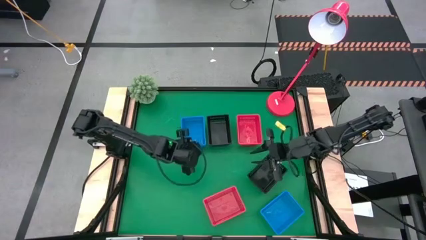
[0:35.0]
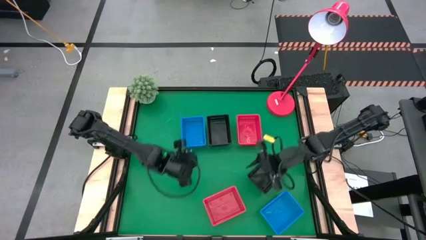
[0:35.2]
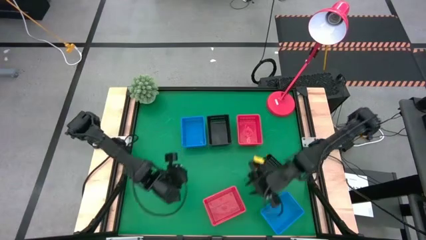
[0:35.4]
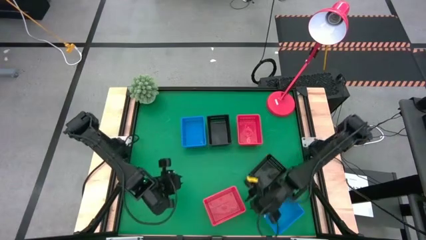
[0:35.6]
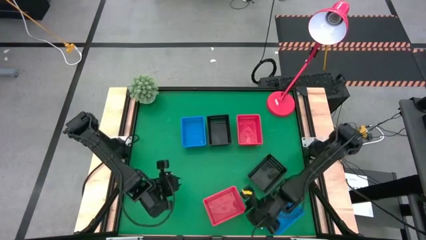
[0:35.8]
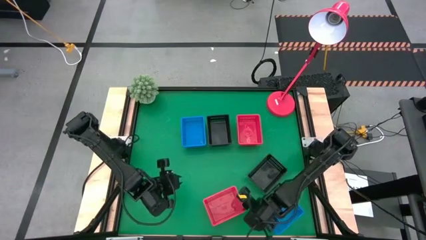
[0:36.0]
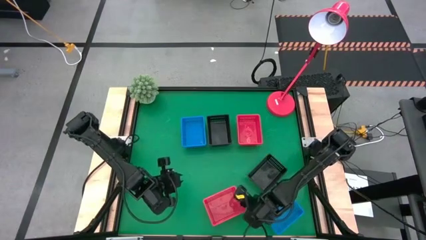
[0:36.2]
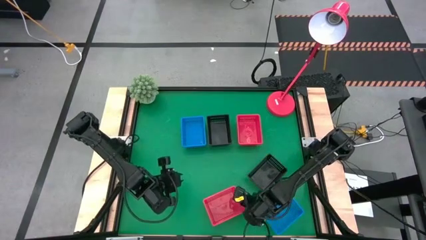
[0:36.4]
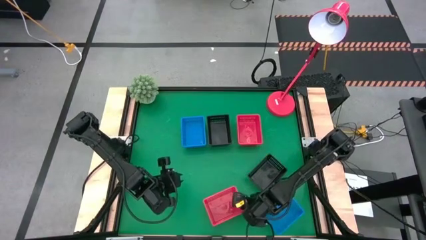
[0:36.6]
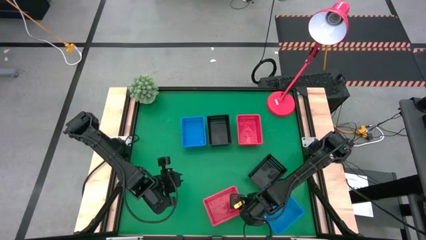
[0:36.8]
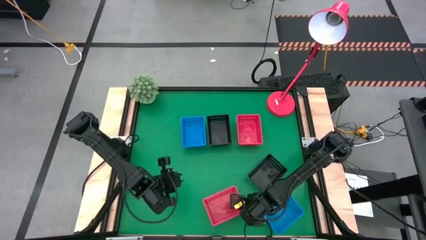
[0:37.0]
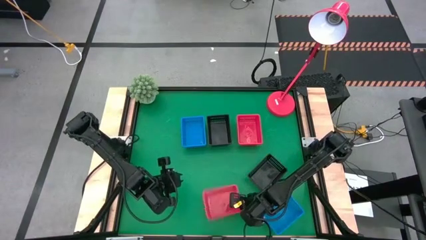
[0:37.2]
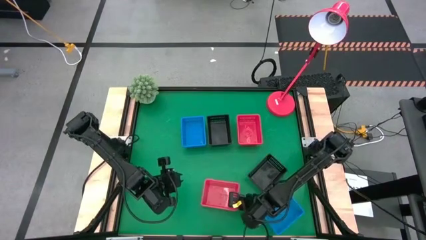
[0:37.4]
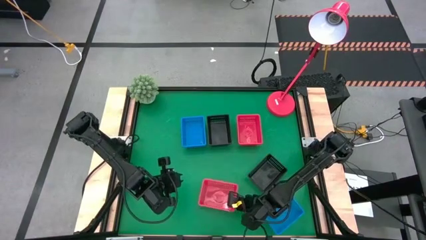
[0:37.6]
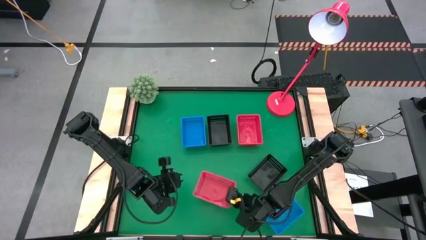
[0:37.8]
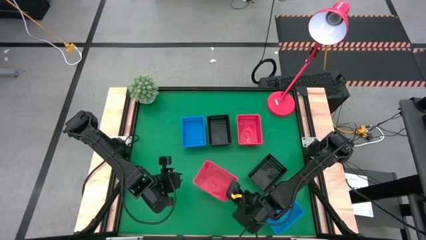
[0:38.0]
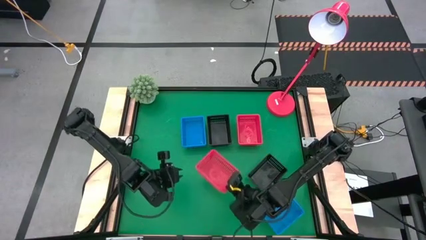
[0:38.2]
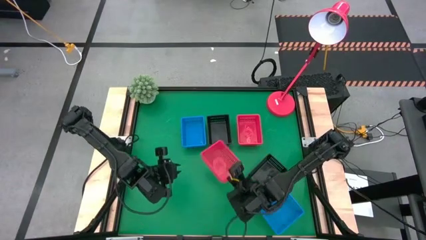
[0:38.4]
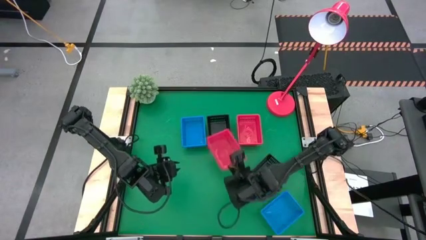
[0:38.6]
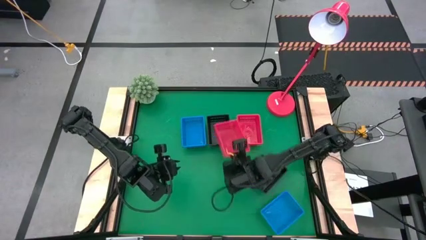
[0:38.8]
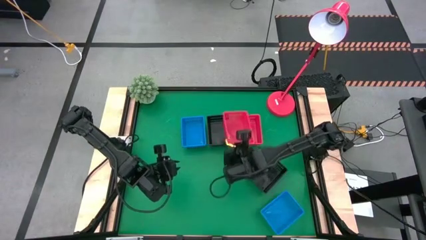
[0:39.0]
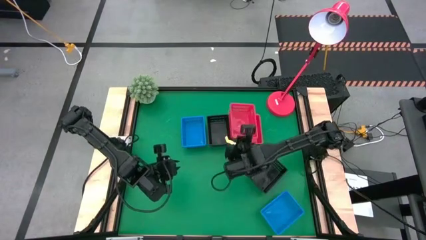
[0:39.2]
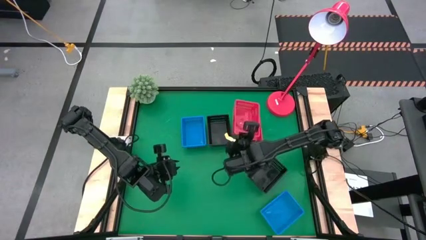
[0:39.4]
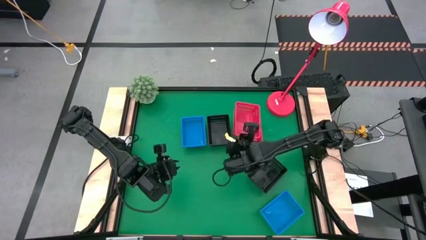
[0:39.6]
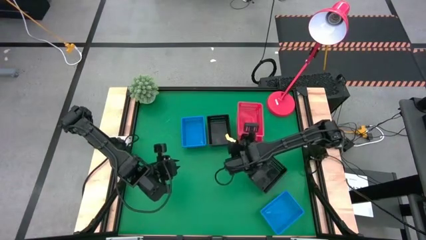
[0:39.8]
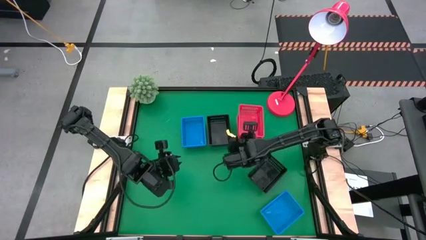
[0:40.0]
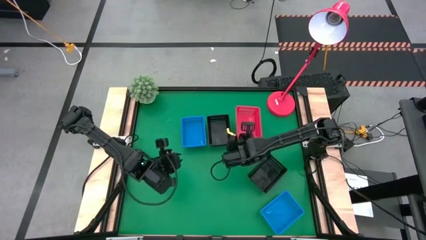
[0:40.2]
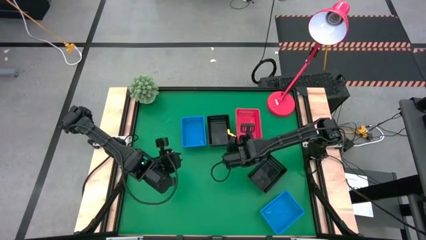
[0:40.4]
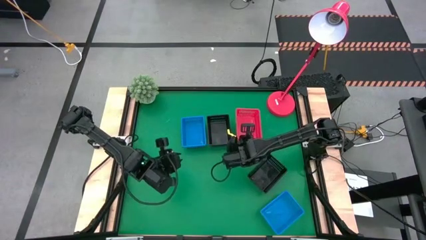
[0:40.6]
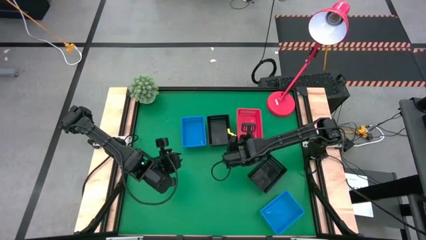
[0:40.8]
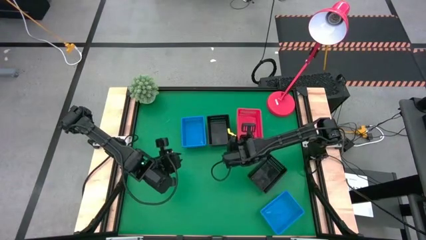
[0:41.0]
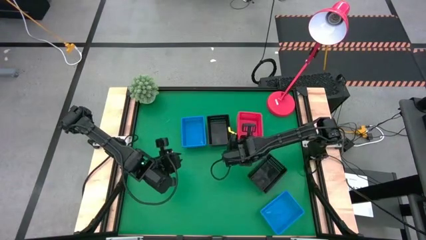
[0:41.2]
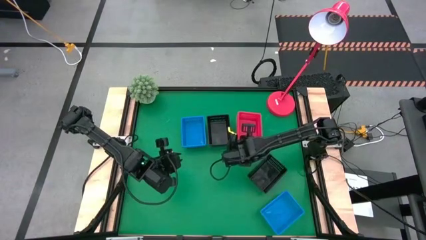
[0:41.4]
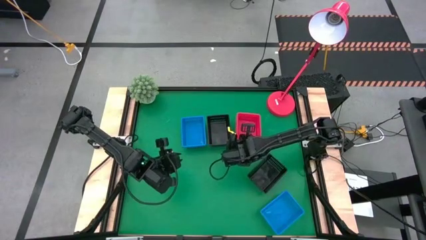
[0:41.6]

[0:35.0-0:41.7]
Stack the bottom red bin on top of the top red bin

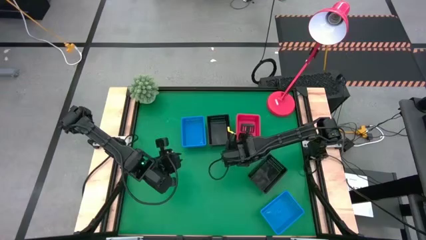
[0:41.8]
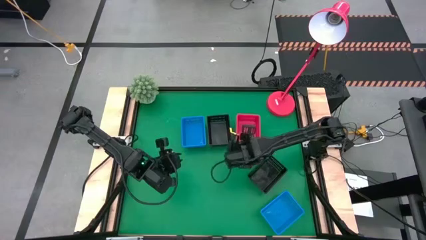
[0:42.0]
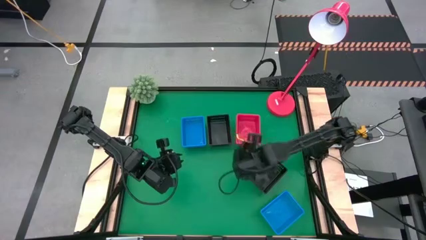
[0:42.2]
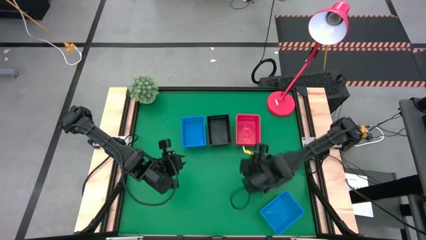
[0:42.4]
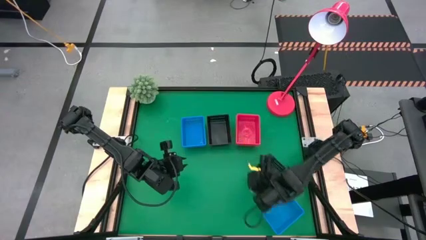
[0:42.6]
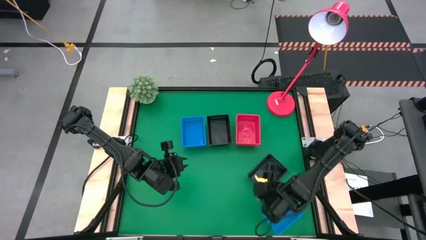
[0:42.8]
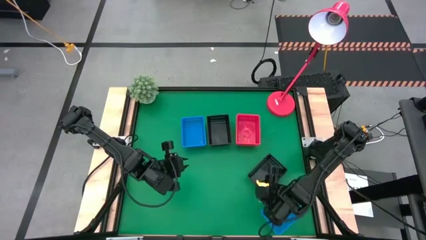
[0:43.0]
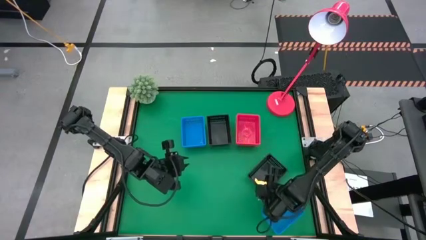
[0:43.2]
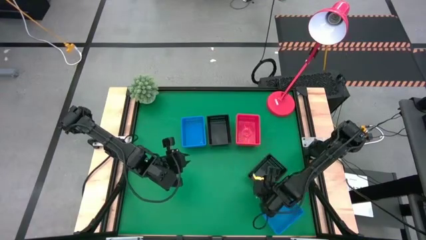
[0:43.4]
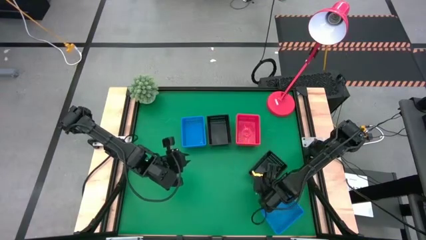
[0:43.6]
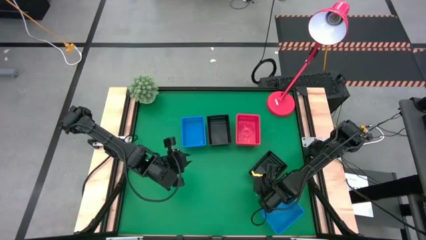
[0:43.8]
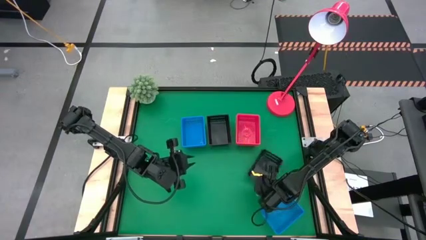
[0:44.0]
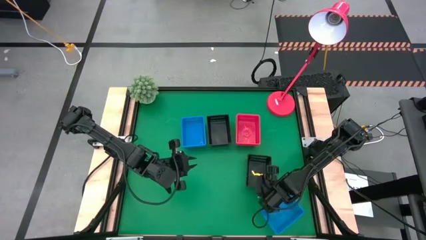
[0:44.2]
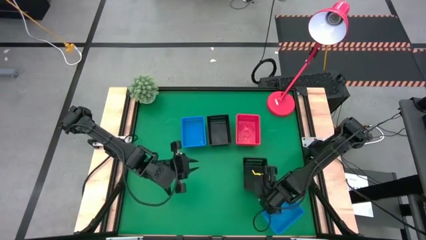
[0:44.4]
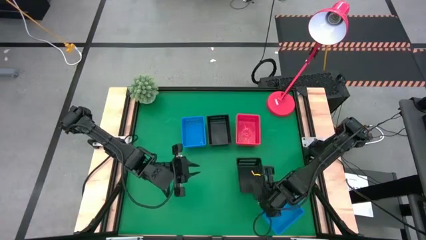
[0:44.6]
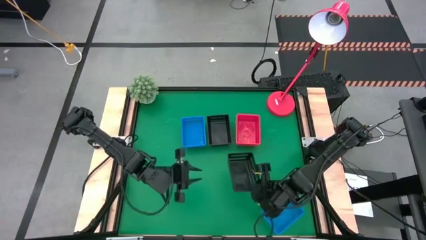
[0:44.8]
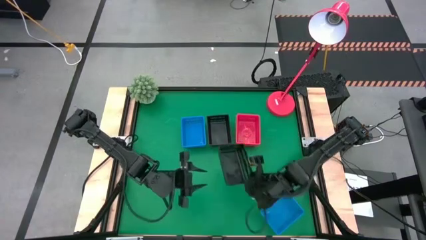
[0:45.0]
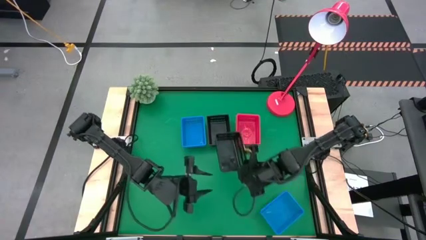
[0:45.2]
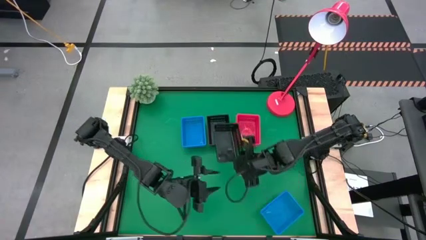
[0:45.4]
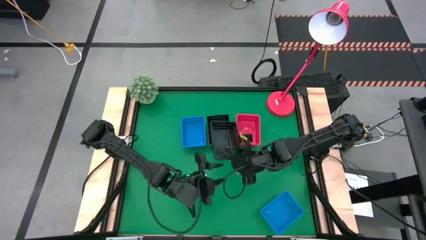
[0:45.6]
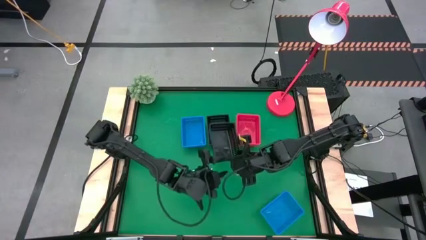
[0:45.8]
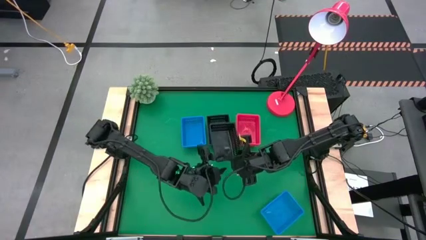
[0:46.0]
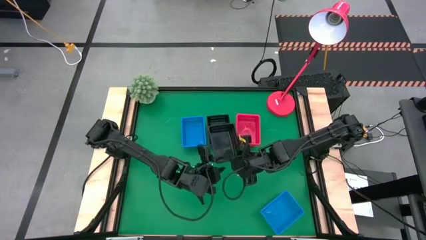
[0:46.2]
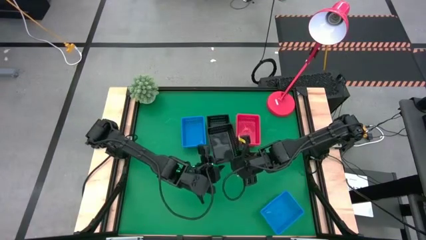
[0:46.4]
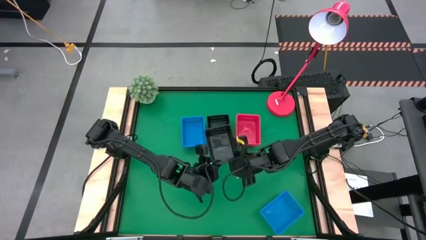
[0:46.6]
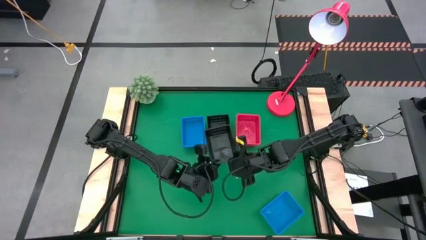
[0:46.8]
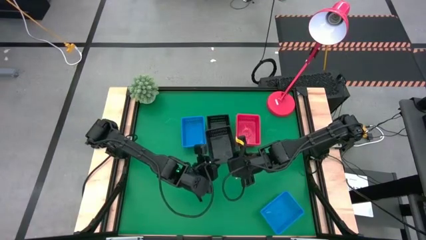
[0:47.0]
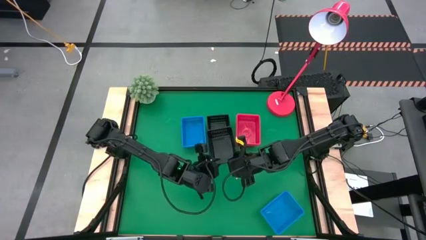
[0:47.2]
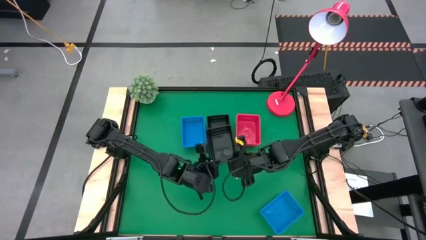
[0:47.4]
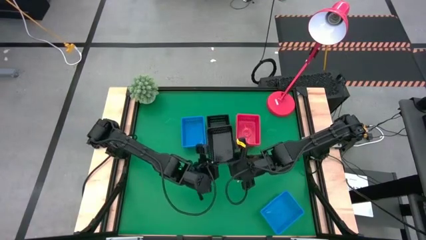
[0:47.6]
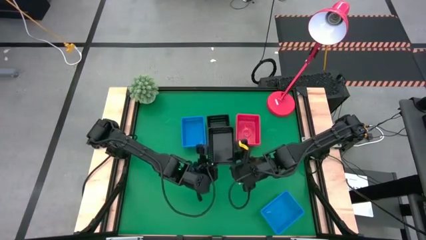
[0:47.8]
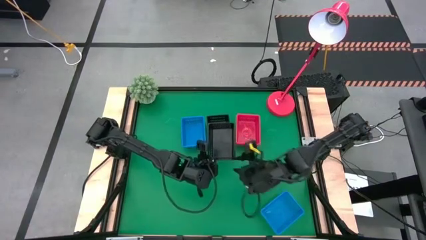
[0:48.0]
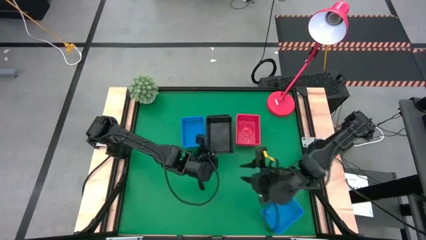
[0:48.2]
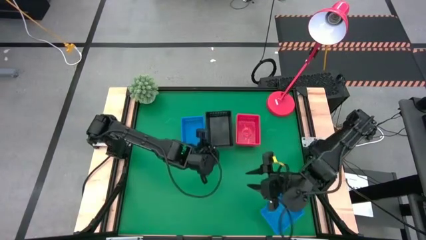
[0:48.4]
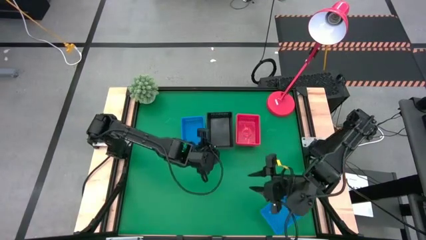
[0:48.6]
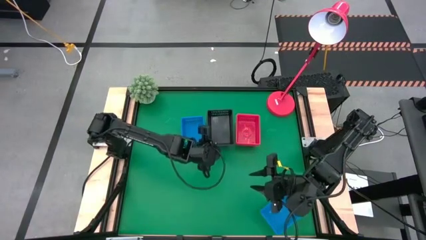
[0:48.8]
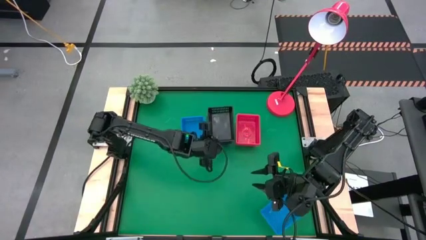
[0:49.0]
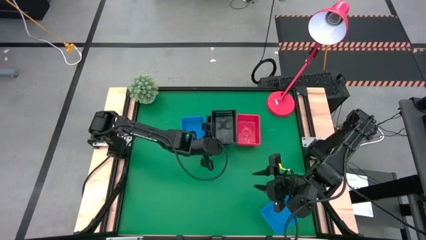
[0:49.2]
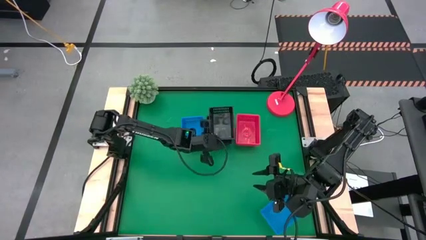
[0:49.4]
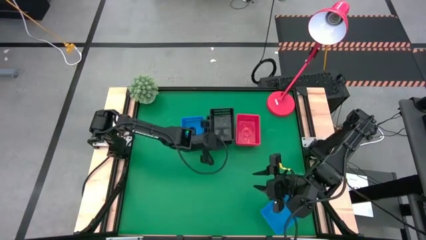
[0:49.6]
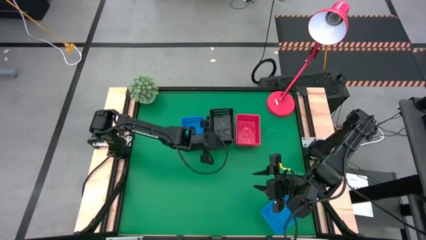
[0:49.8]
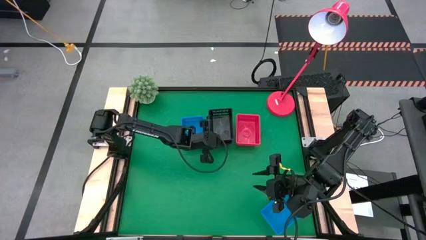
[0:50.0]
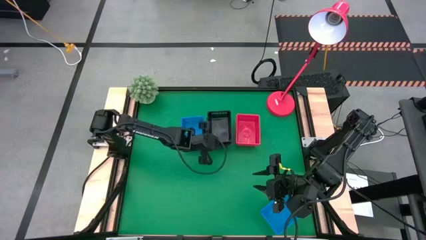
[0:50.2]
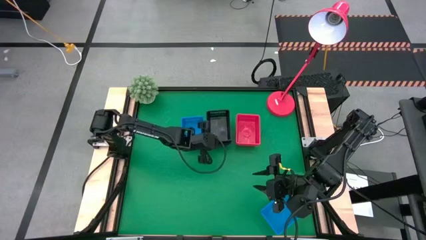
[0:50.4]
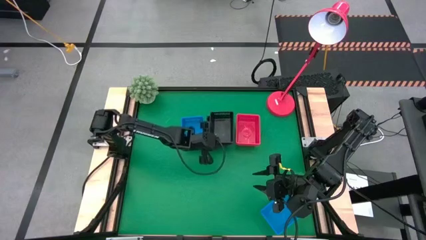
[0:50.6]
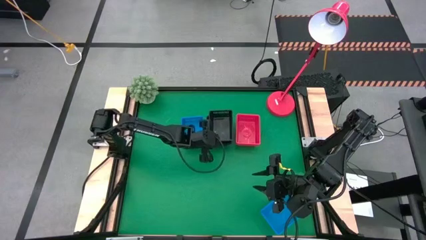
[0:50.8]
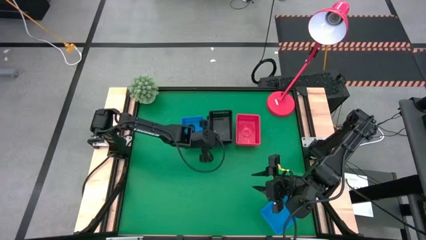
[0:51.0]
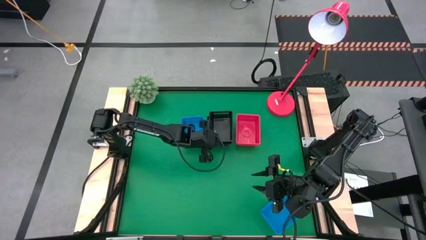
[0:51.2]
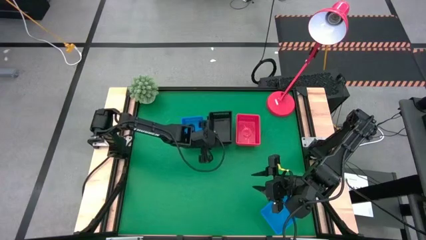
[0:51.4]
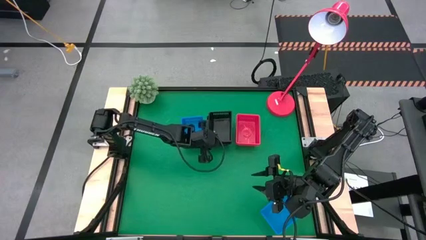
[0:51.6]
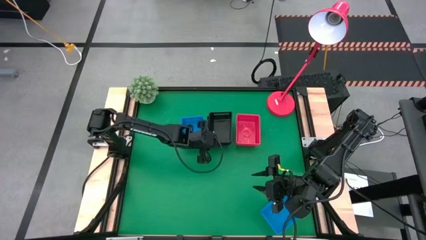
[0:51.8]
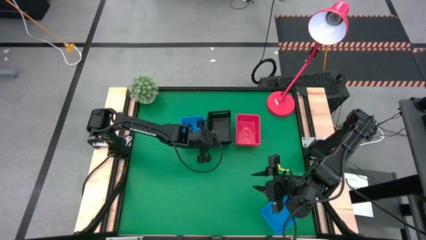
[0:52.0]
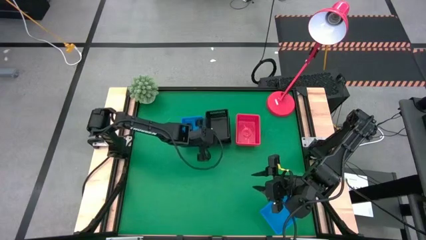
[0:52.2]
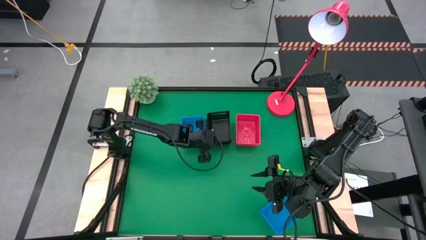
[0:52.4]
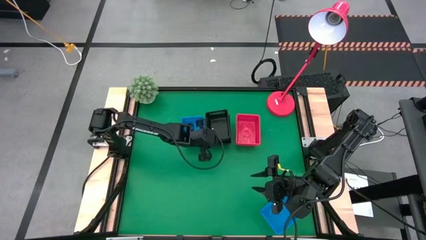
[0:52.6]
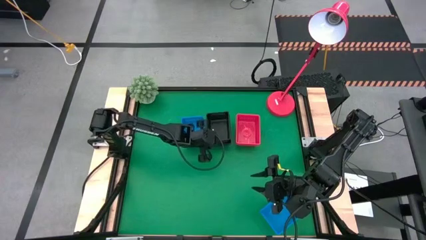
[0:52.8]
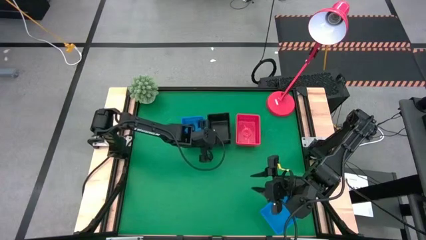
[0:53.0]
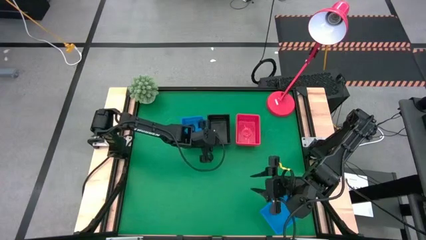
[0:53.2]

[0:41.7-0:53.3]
Stack the bottom black bin on top of the top black bin
